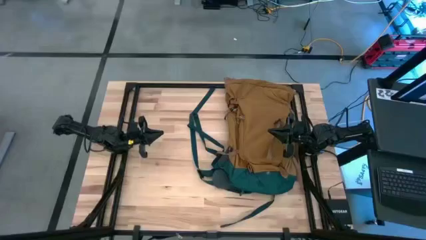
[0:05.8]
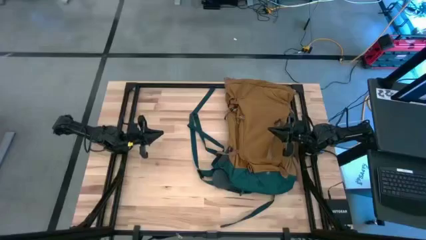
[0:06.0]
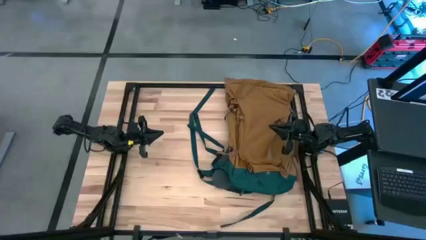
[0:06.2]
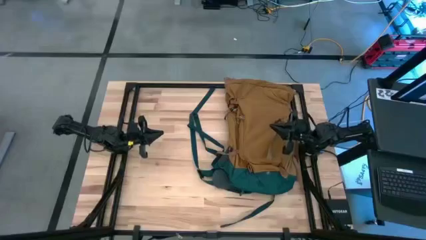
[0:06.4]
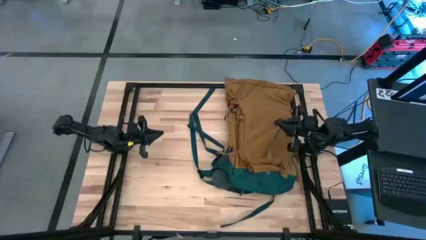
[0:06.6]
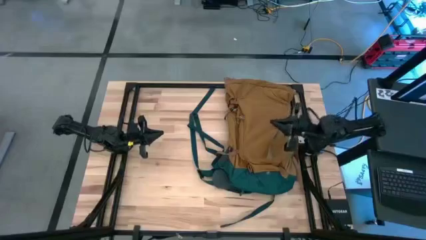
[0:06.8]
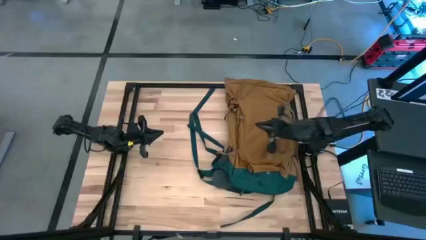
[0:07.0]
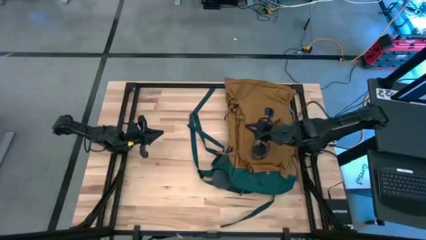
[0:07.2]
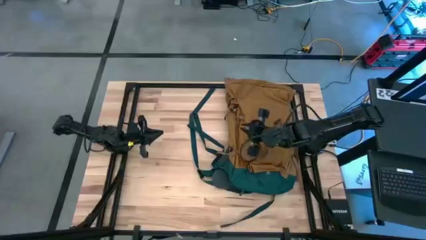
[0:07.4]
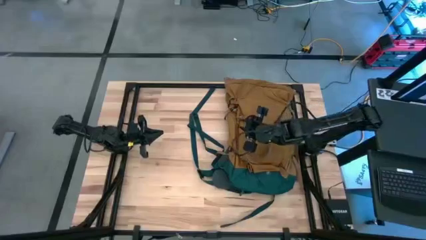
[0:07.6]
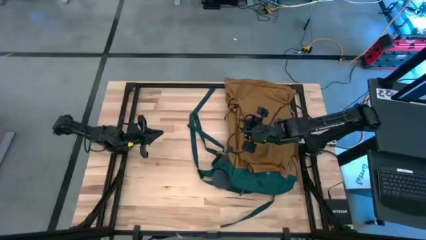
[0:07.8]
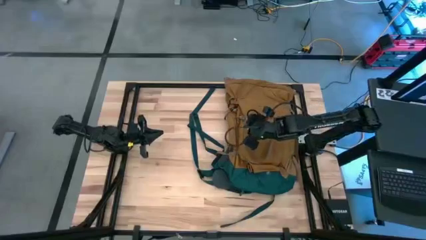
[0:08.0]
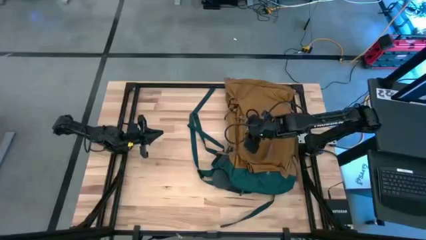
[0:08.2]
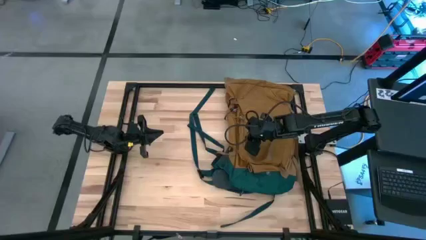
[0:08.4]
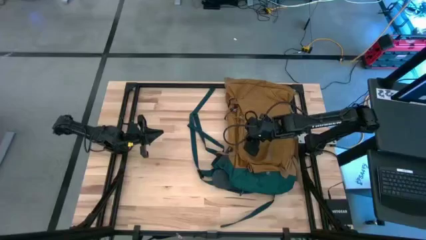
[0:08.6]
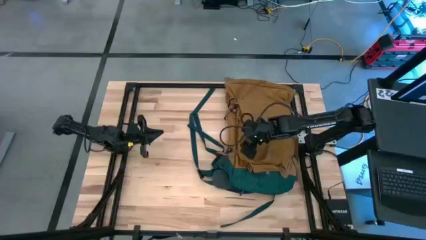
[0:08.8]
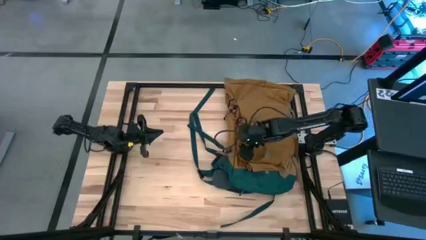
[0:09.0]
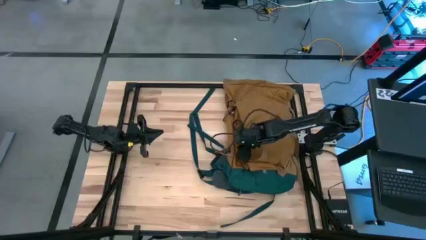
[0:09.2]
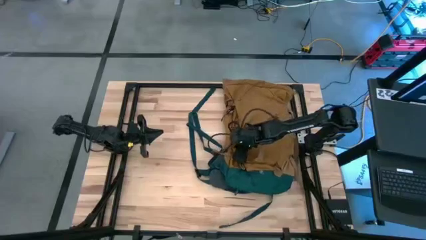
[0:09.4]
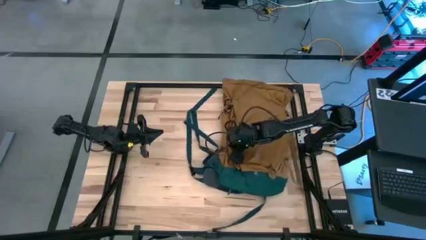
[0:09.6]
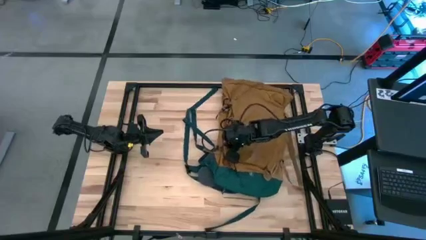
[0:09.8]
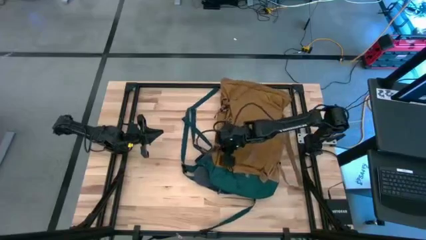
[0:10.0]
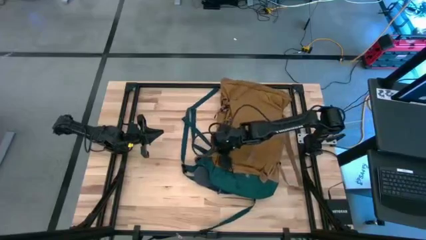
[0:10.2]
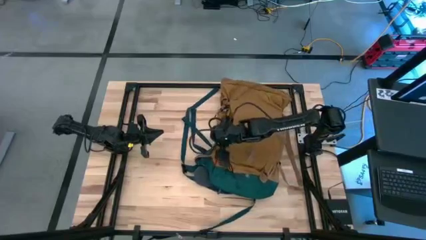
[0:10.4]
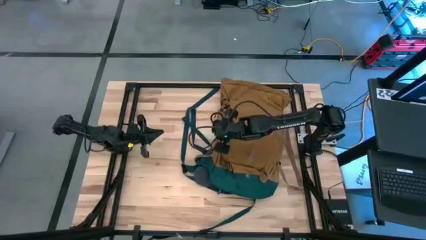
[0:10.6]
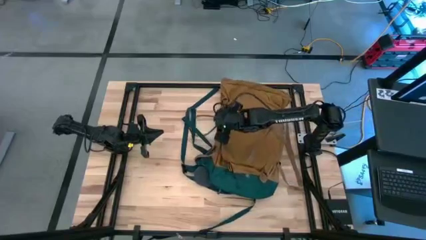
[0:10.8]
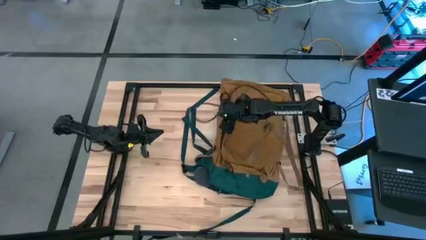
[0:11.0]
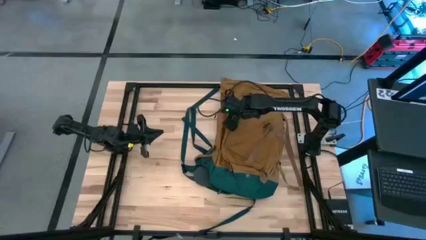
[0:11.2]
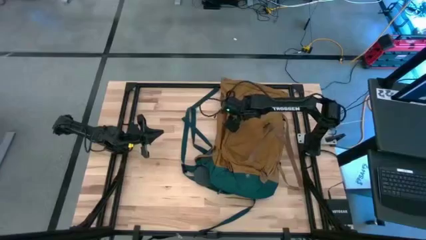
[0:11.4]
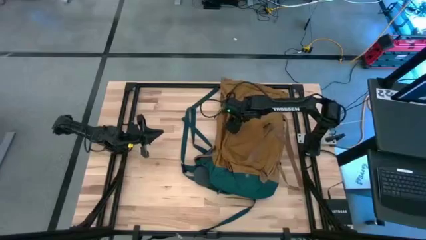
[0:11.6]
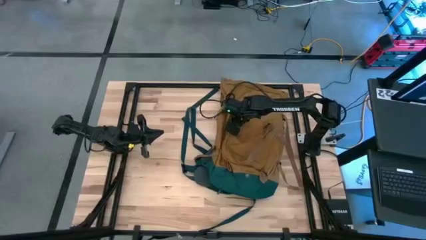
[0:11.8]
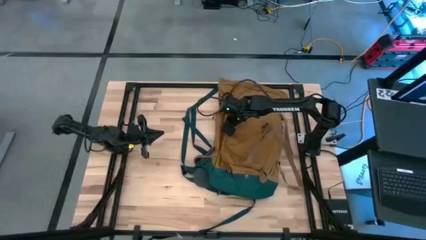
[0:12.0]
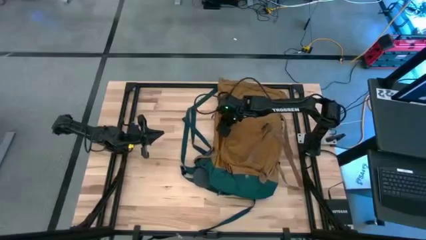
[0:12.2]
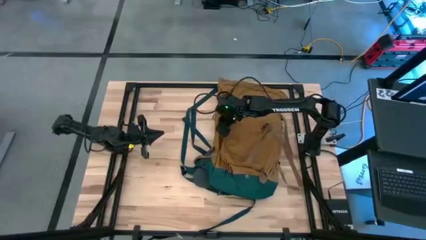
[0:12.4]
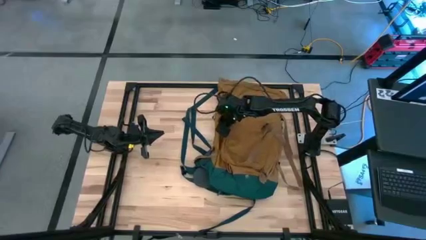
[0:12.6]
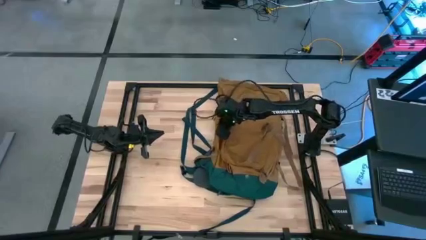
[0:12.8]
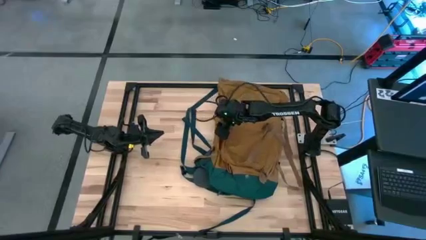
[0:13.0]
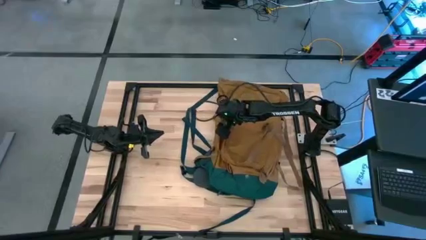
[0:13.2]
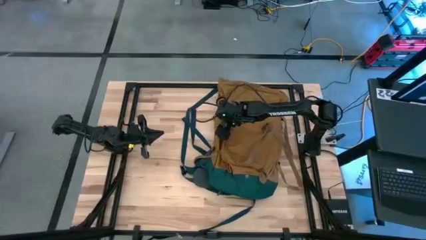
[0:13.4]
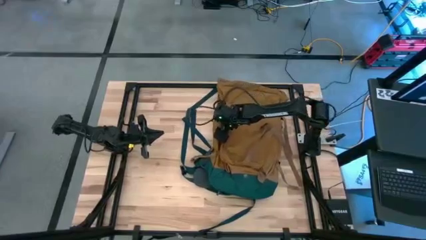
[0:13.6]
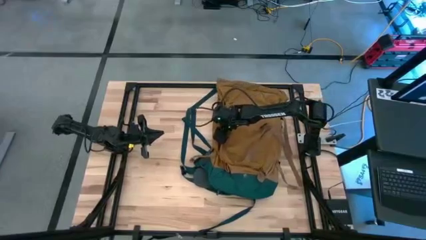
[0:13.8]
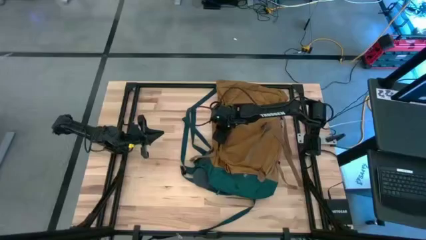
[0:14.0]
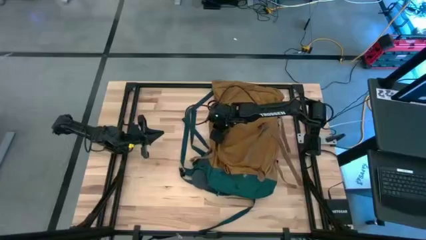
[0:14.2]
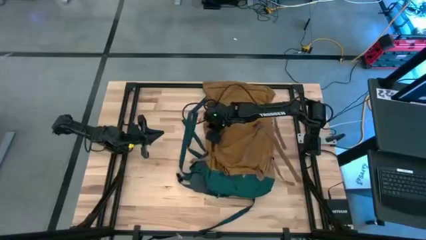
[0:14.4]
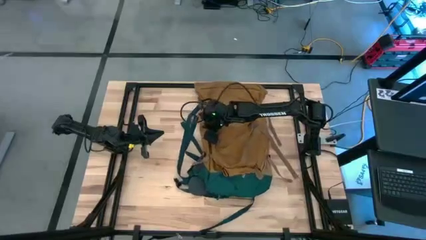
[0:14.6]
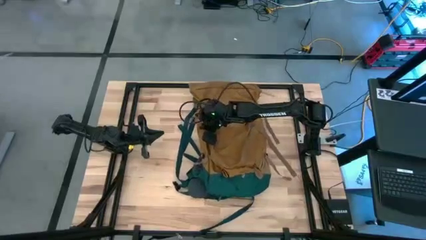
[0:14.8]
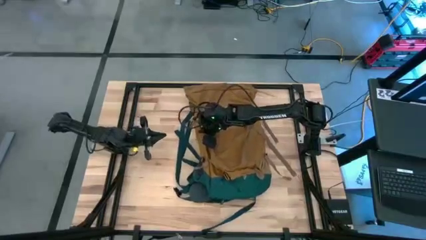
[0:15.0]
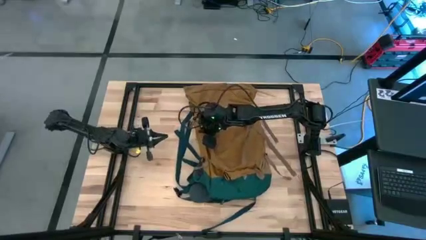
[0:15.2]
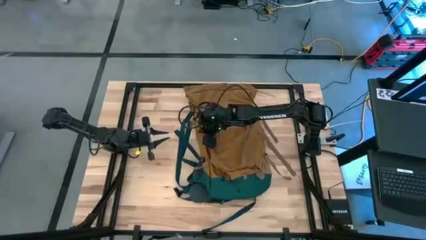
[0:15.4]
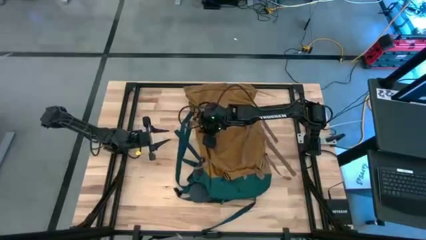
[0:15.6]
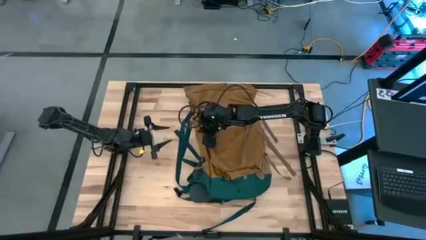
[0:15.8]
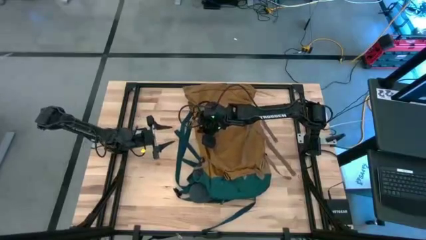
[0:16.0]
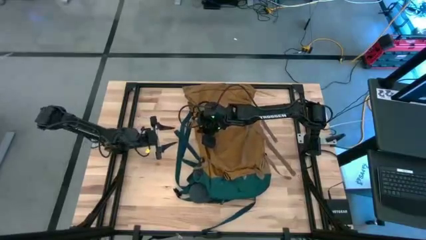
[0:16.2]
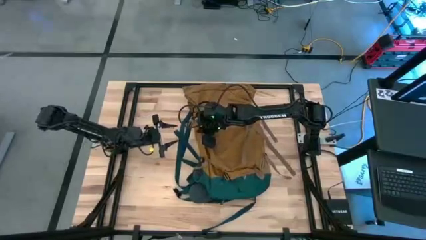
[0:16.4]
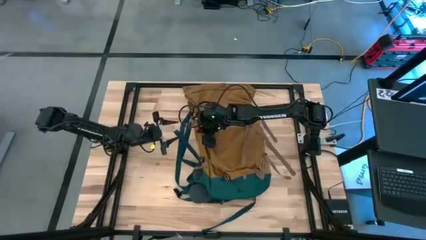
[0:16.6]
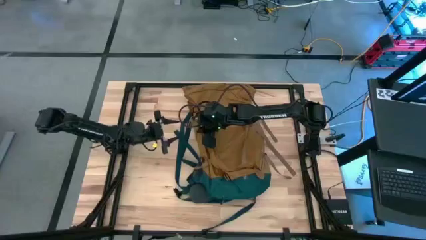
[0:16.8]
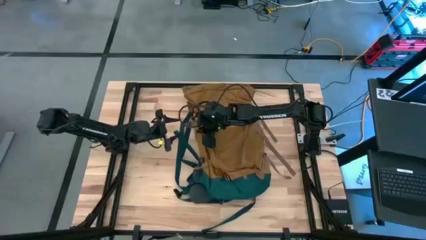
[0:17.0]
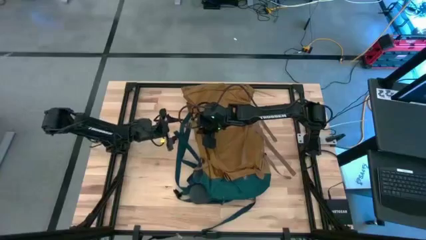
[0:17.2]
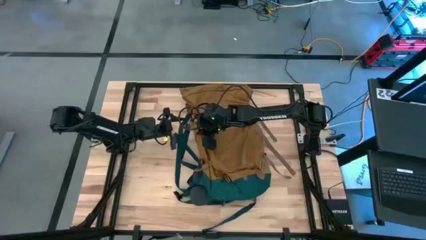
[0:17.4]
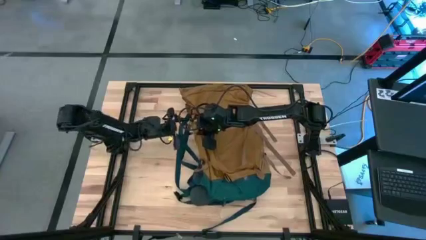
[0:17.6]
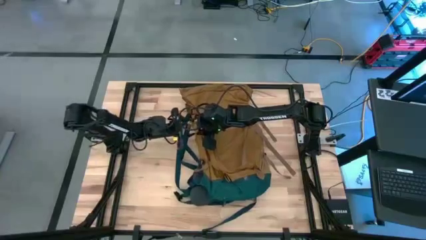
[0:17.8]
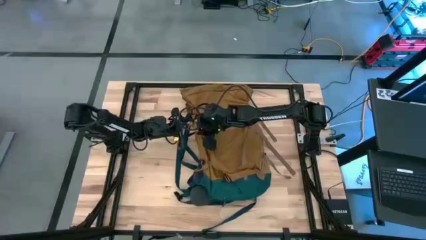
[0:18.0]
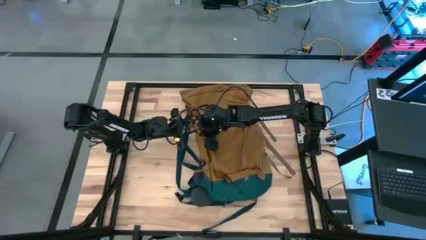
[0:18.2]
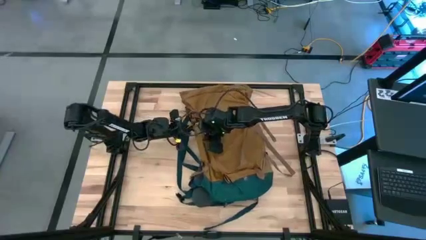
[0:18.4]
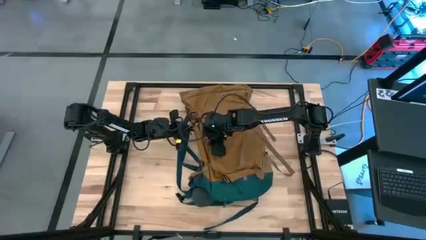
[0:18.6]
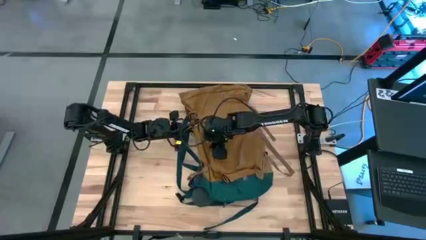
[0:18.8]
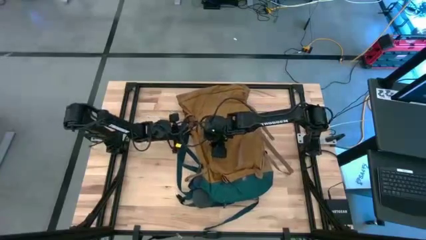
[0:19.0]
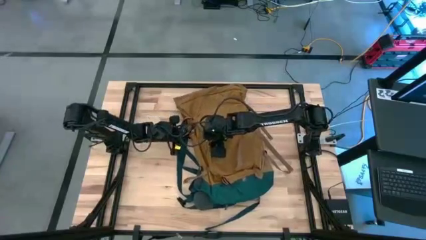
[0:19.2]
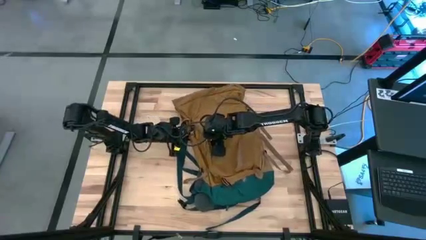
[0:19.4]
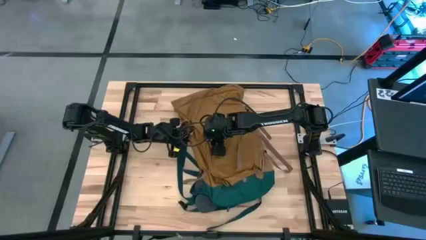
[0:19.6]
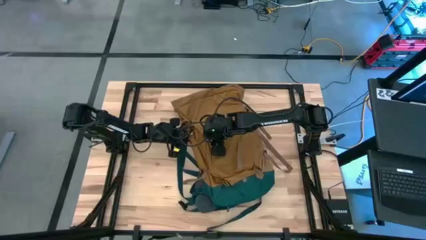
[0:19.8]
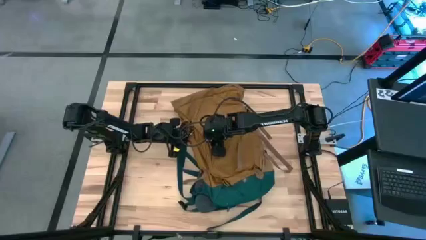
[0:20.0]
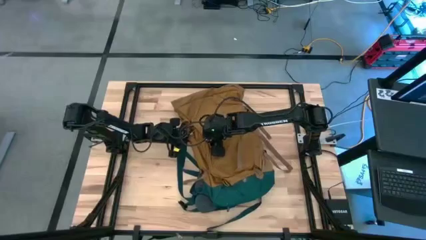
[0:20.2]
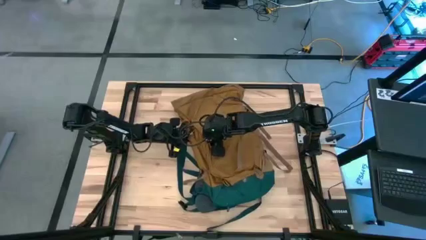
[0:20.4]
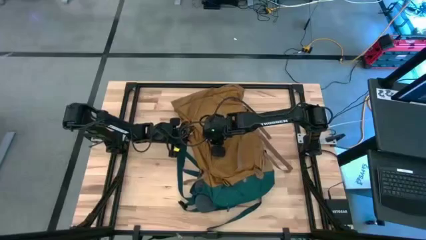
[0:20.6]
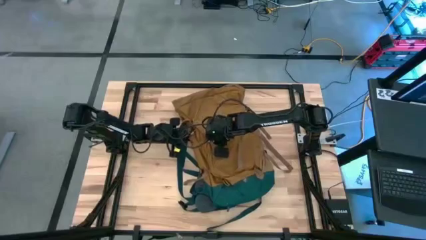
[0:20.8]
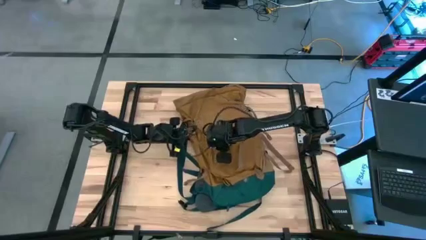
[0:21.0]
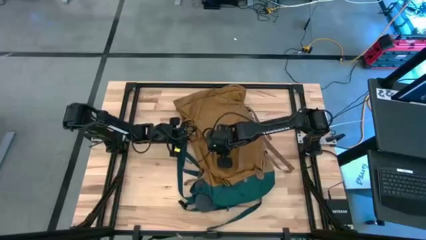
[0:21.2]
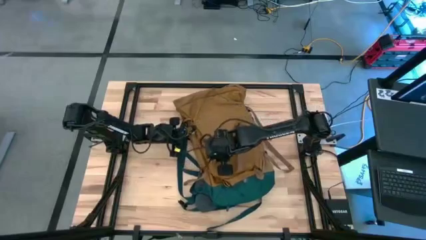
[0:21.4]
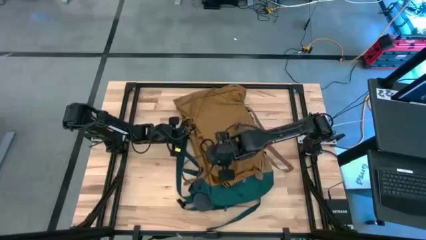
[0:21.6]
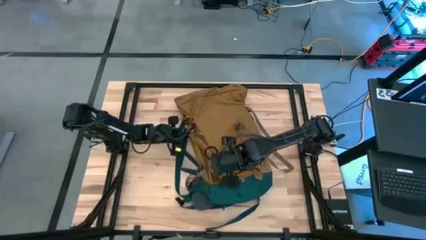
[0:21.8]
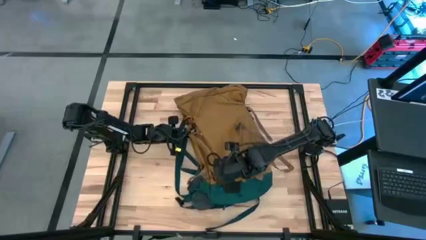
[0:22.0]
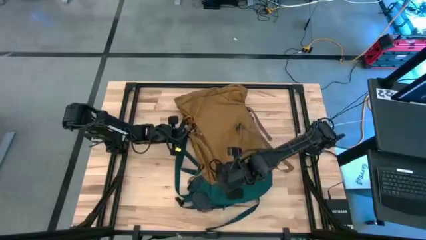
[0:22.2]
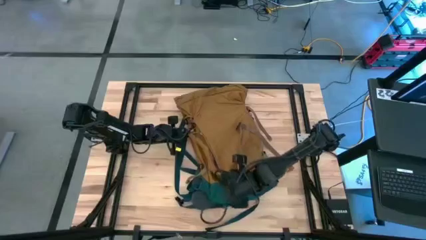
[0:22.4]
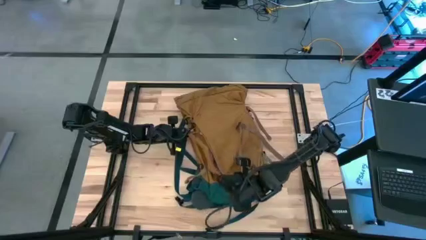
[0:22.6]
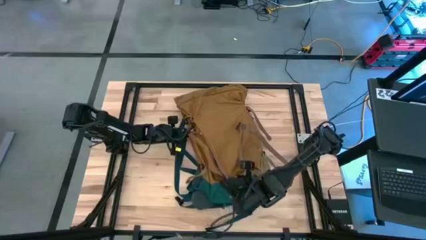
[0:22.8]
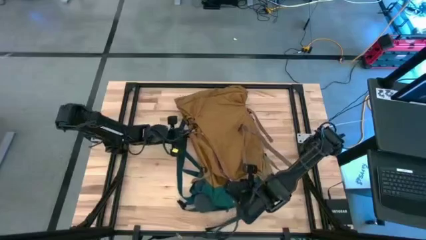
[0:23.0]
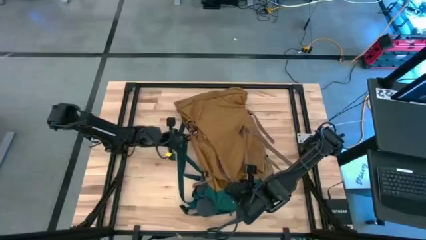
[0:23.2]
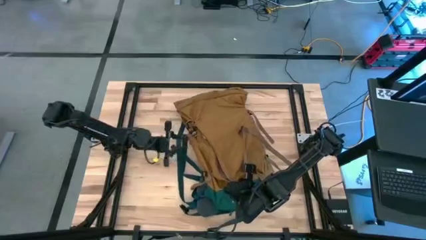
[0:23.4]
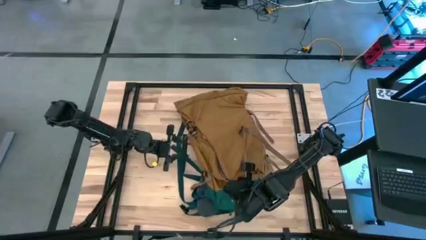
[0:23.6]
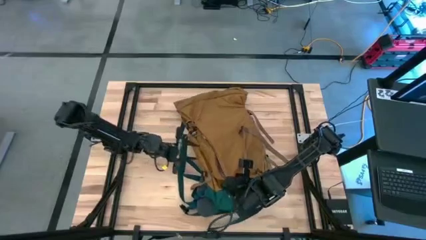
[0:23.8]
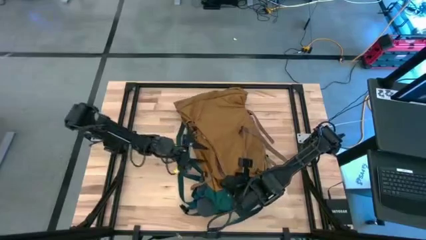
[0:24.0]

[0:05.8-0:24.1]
Task: Unpack backpack
Open the brown backpack
